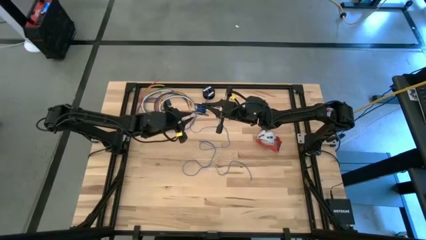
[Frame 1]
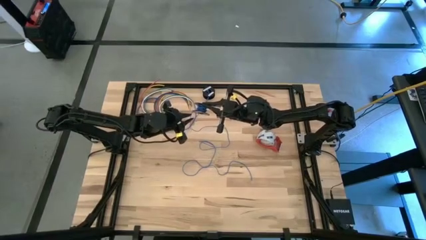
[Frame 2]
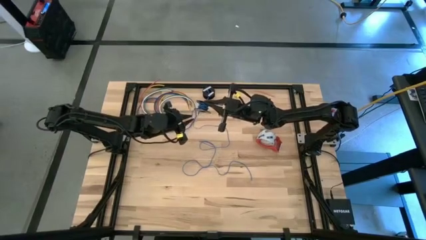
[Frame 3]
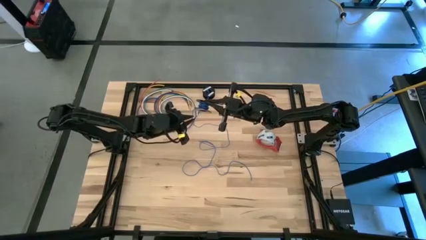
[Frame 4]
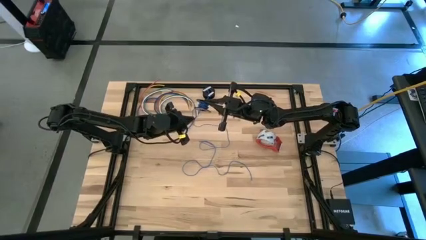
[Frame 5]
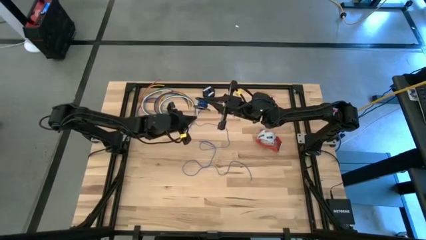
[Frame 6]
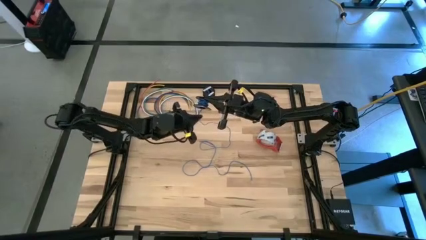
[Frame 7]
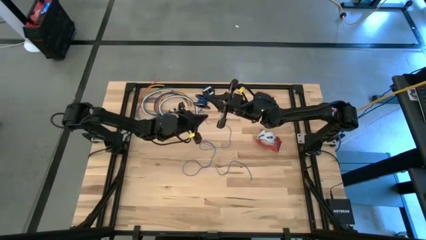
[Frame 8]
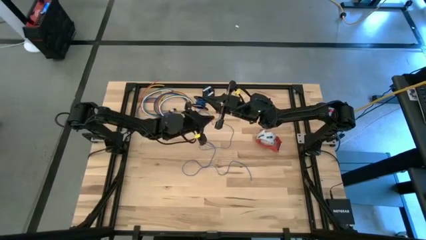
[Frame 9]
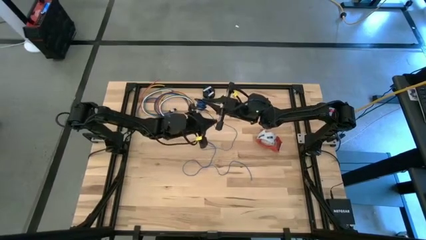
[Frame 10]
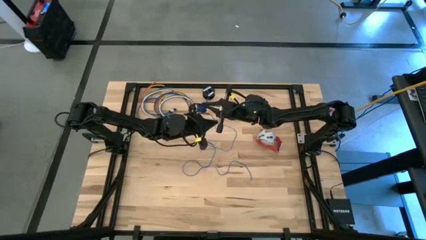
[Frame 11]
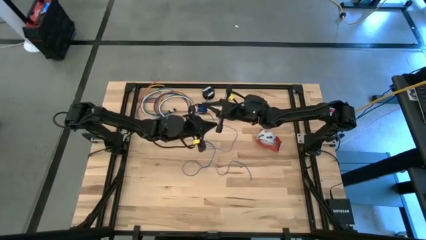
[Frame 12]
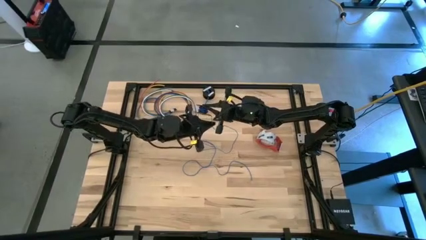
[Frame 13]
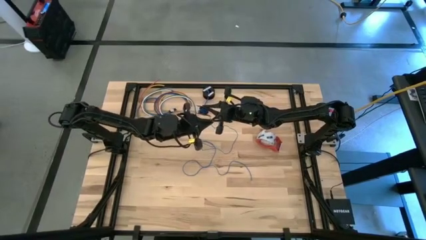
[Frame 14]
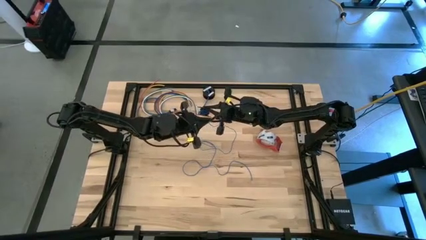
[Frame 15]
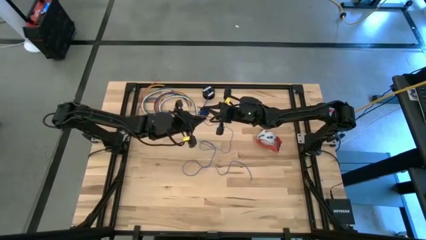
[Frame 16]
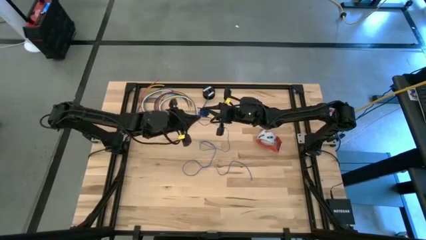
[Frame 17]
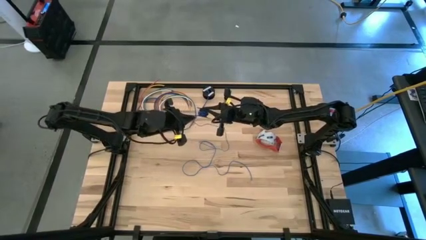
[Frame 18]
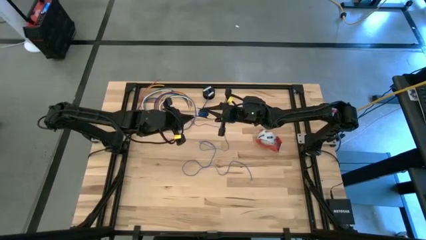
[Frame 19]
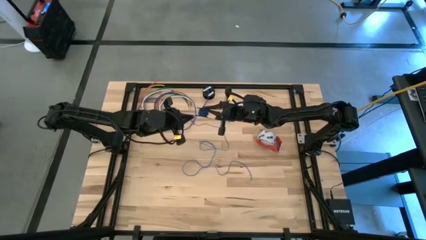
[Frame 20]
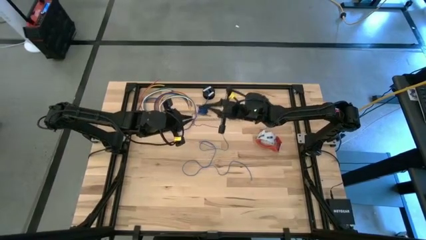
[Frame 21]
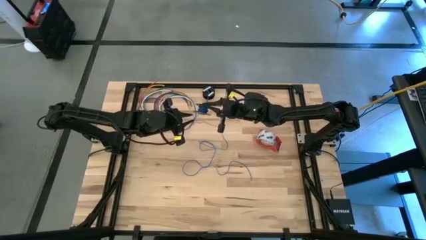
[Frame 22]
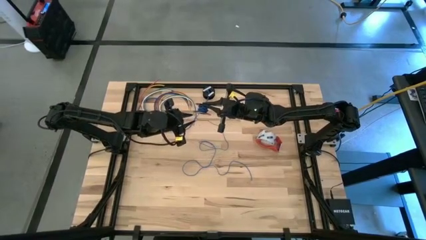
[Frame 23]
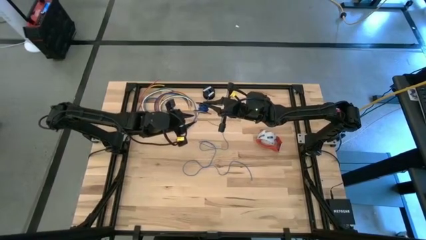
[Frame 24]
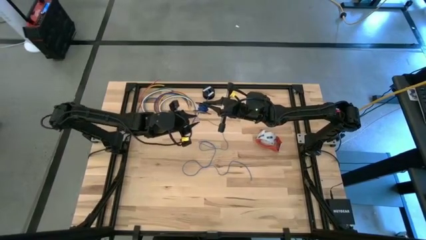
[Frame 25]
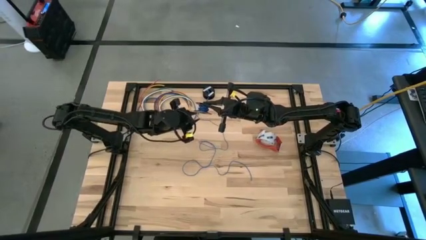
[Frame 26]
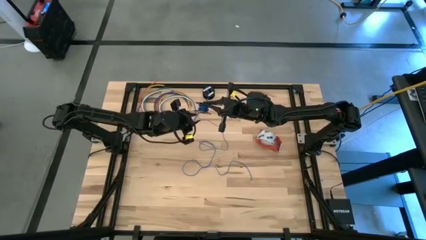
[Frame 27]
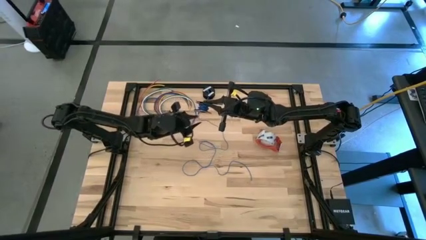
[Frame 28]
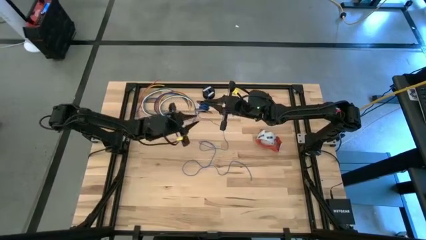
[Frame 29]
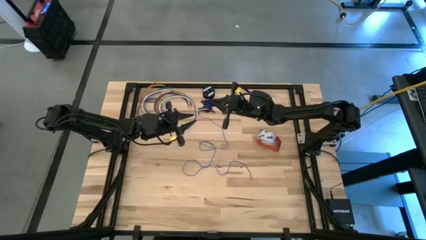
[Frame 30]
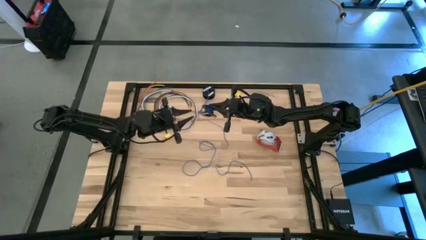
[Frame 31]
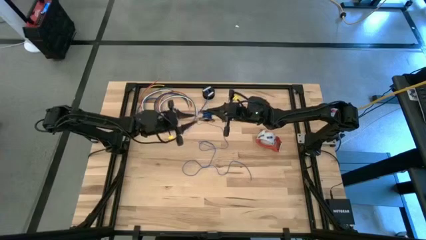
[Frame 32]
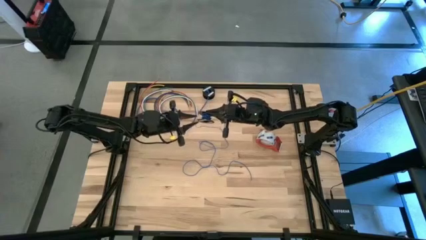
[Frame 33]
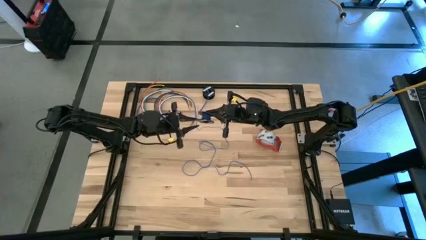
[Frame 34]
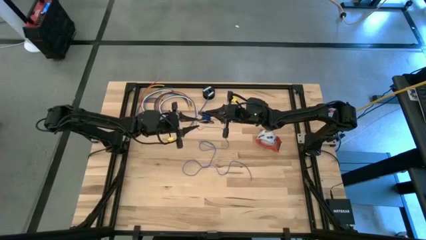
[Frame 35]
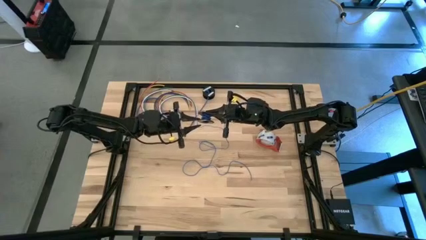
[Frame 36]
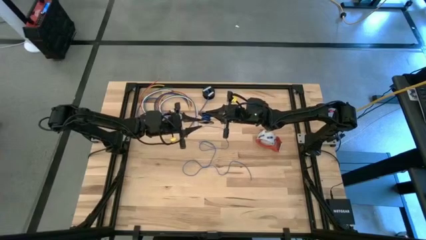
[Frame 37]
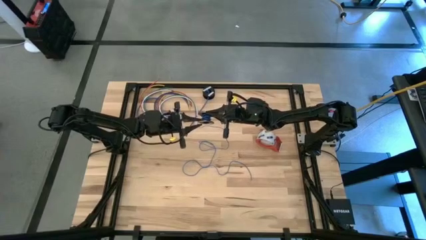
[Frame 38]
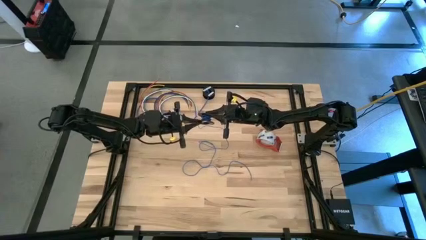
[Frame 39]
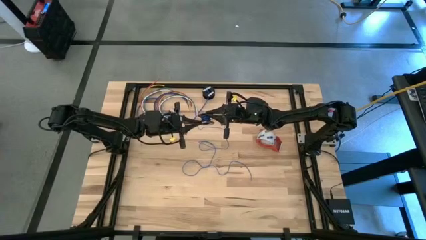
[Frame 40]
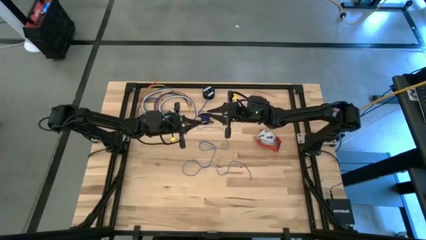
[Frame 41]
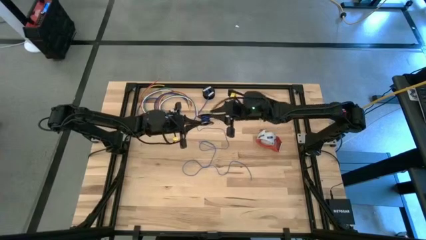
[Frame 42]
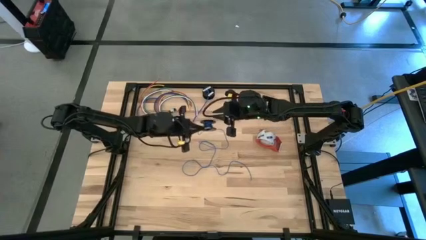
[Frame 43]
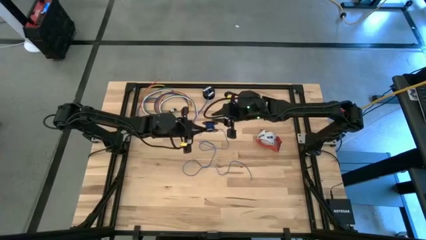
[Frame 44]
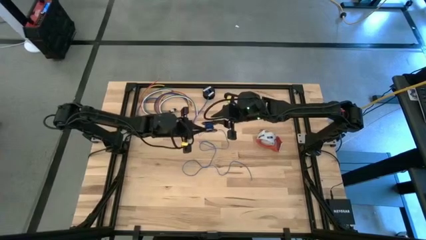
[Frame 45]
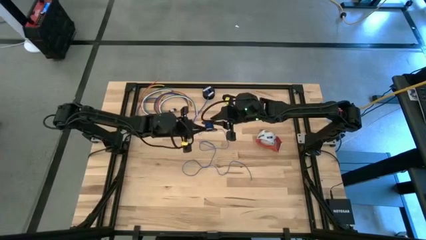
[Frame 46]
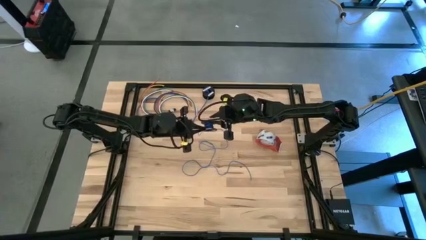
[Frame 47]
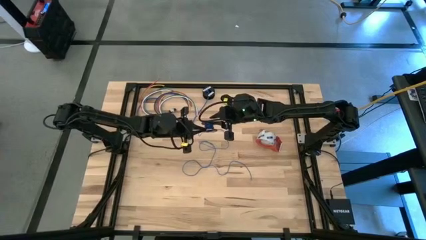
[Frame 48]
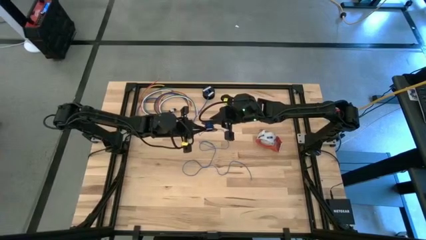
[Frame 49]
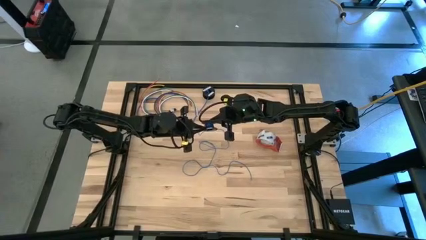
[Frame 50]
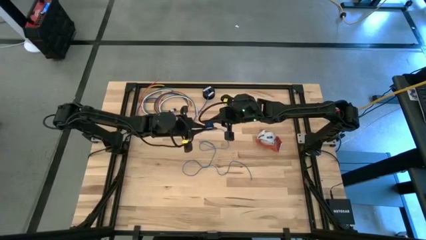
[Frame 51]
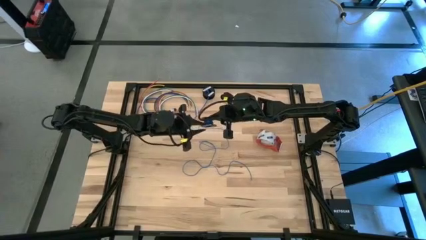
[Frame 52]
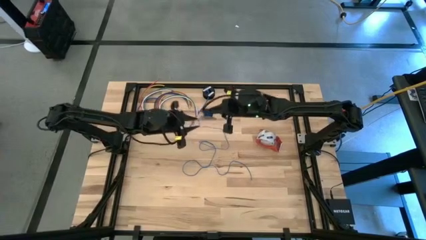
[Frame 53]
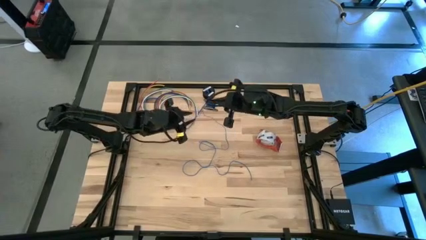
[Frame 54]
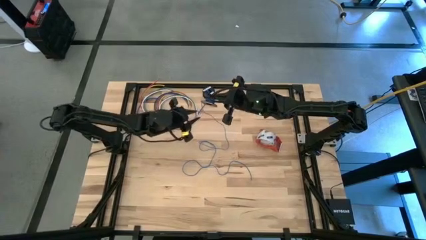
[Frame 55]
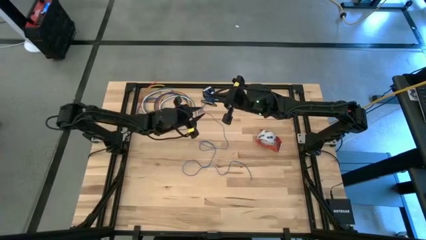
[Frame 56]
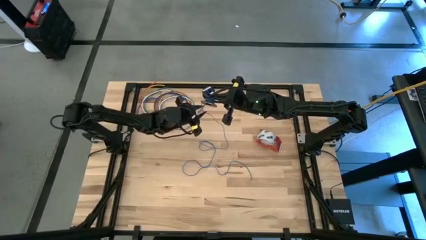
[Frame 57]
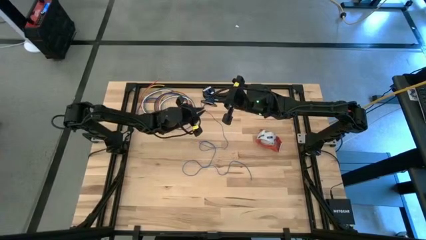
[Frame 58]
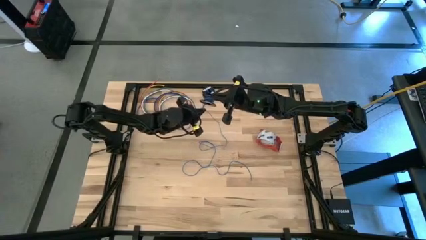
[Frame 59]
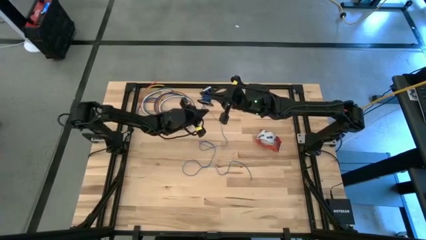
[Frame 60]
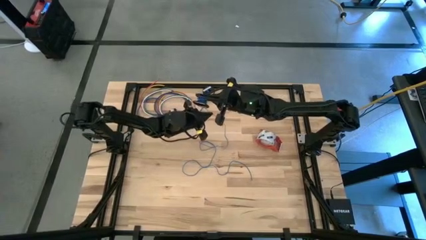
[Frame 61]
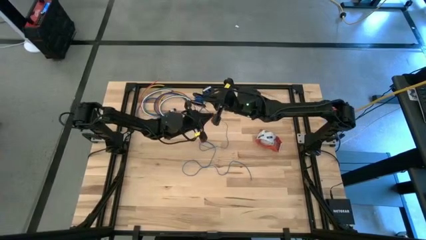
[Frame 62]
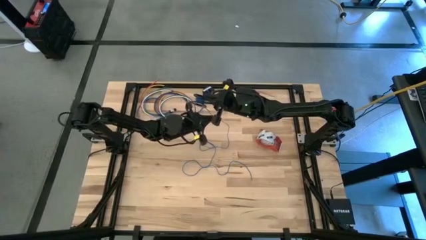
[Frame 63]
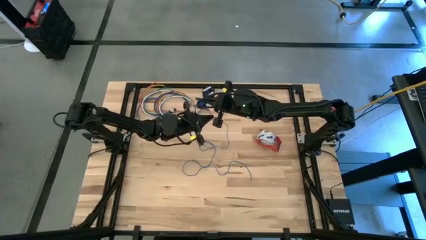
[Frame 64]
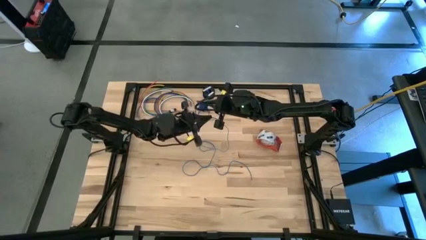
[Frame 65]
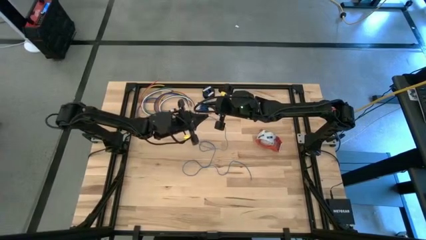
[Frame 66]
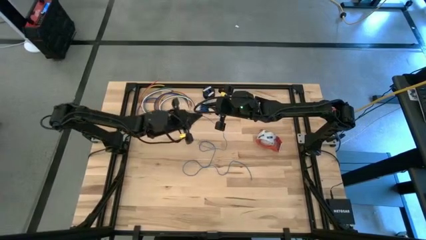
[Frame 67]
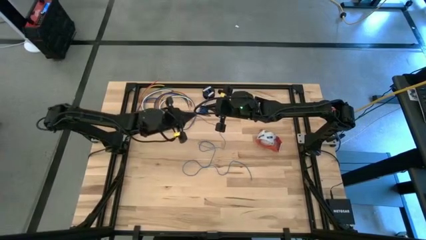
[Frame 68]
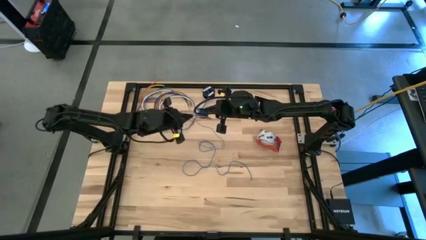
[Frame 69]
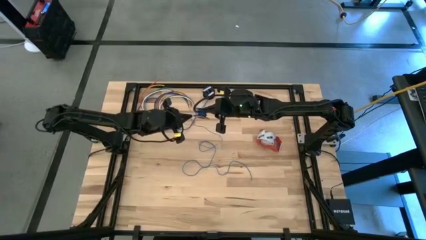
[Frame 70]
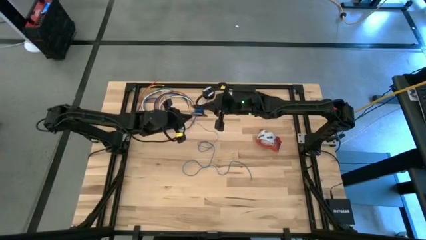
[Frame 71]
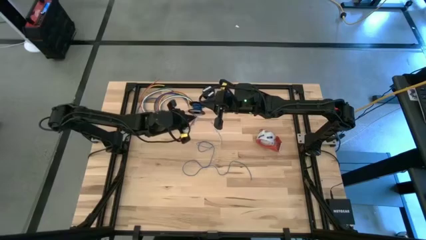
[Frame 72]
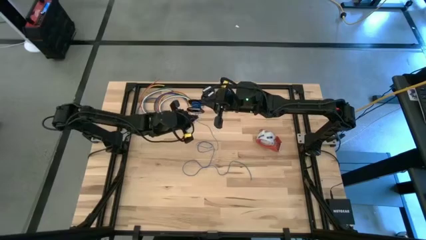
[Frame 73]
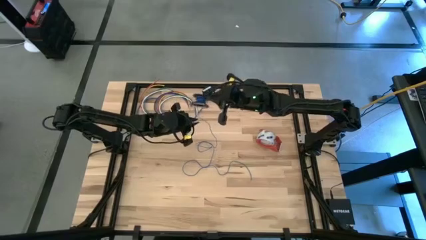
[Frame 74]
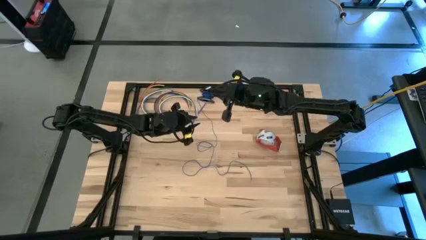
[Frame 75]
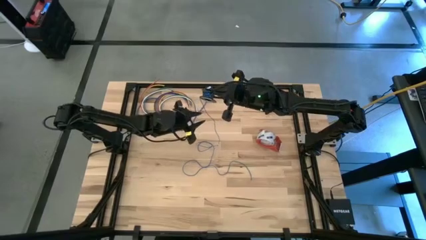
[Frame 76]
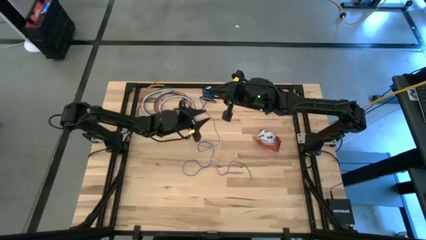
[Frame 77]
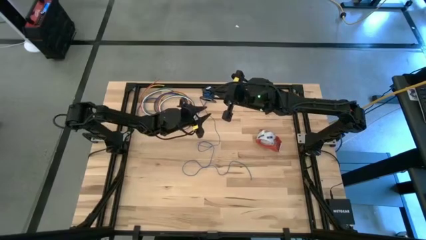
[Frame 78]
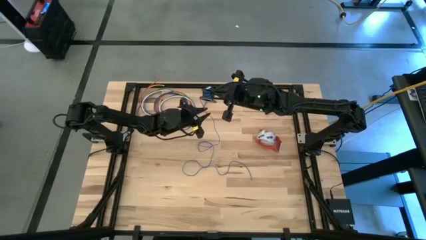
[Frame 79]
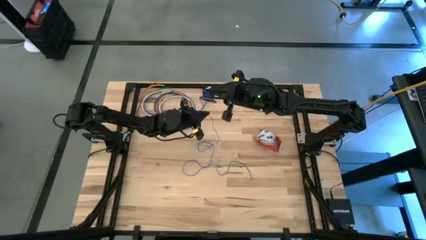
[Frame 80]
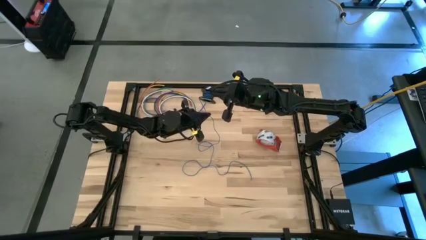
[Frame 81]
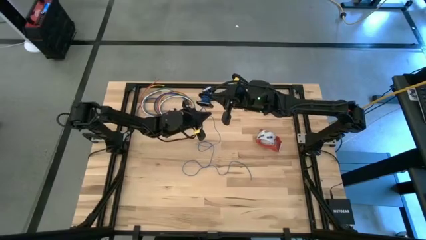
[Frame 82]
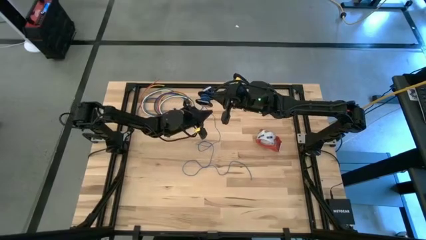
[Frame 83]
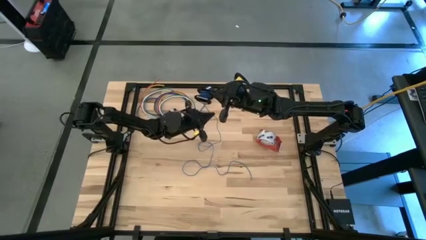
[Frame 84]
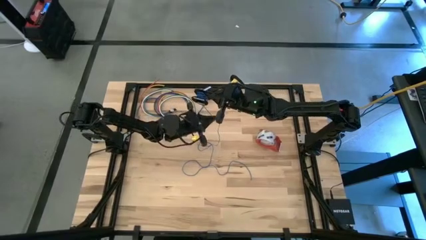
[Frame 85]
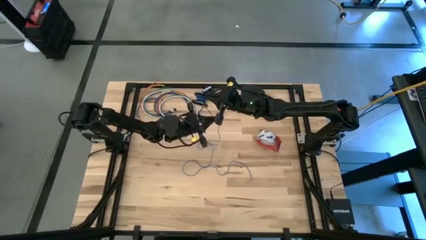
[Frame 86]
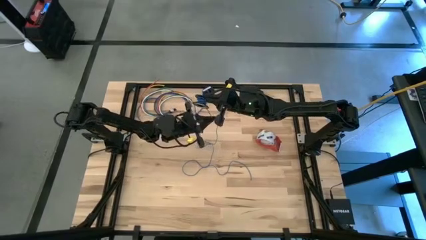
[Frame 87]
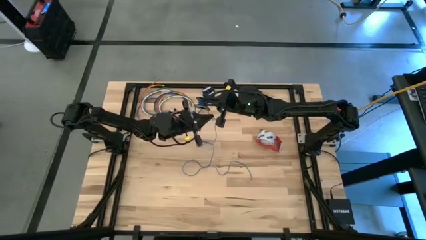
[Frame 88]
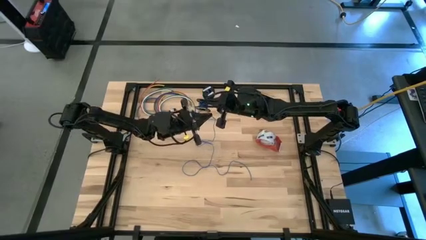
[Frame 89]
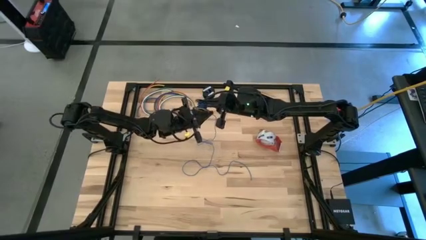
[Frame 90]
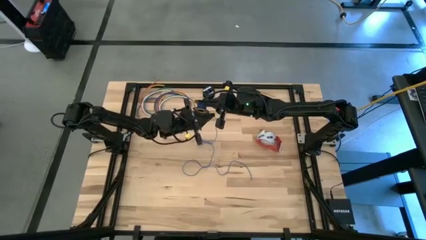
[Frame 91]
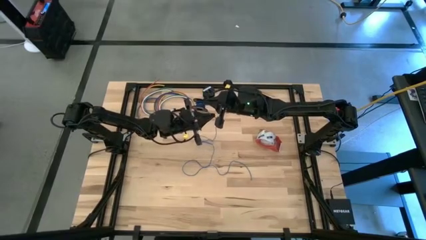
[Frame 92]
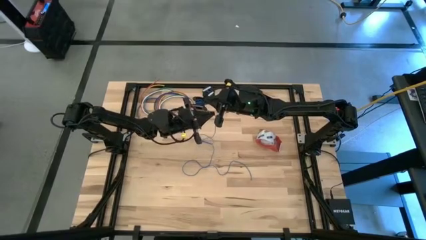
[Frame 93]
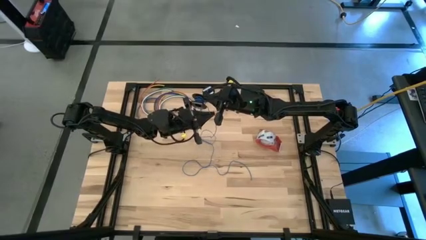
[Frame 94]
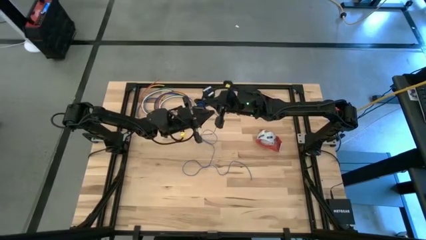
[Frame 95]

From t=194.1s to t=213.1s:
Task: Coil cords
Coil the blue wire onto the spool
